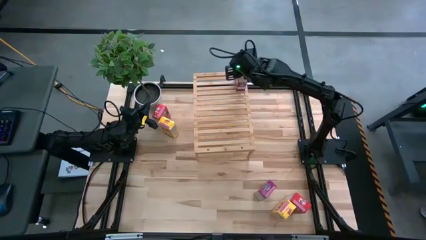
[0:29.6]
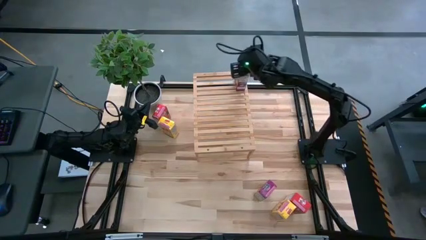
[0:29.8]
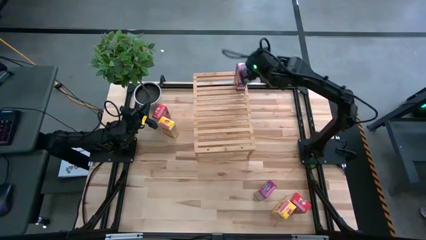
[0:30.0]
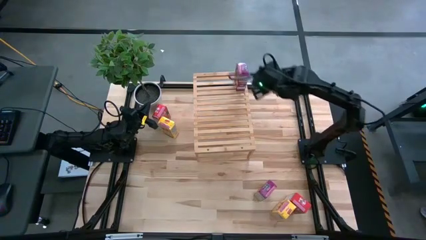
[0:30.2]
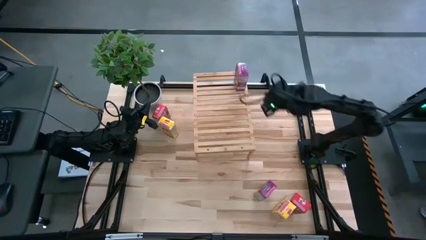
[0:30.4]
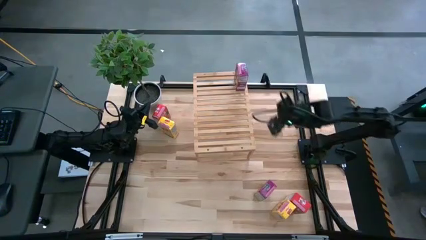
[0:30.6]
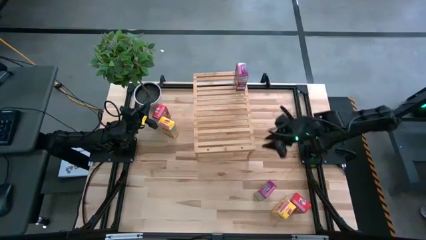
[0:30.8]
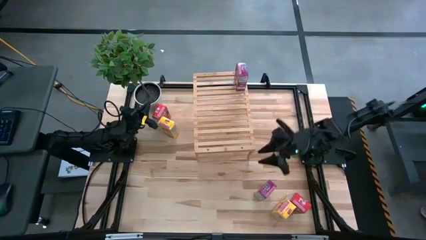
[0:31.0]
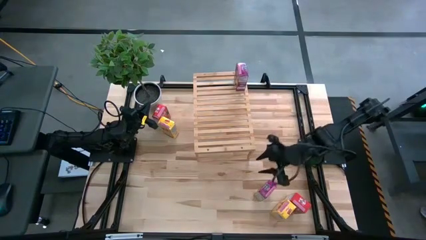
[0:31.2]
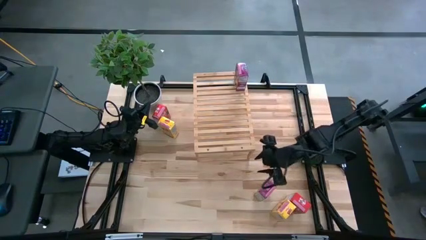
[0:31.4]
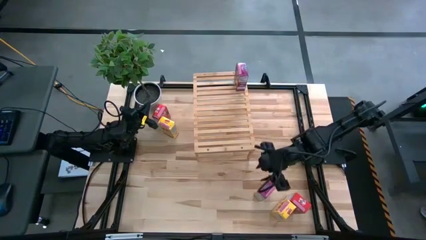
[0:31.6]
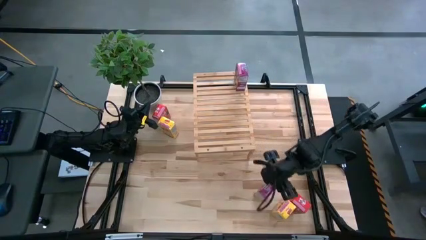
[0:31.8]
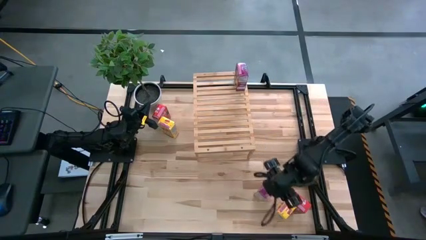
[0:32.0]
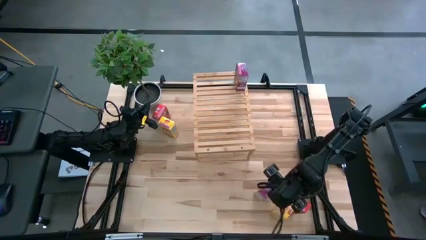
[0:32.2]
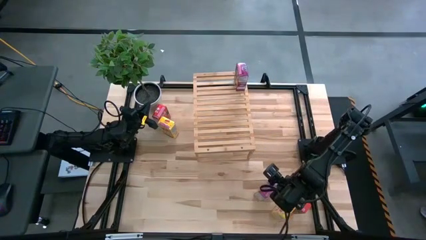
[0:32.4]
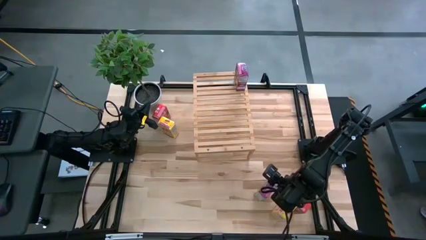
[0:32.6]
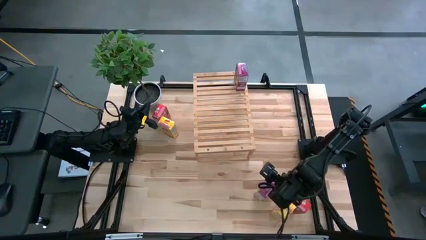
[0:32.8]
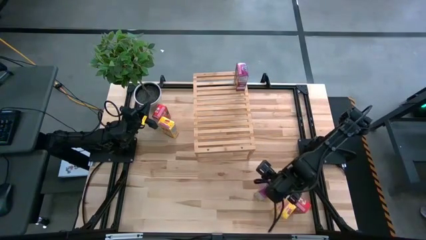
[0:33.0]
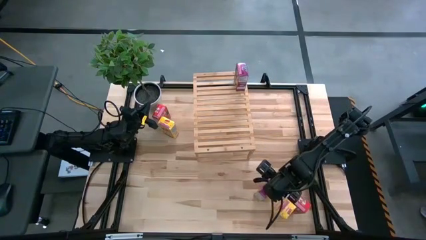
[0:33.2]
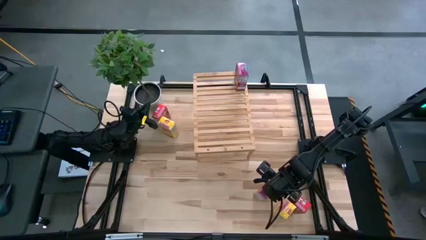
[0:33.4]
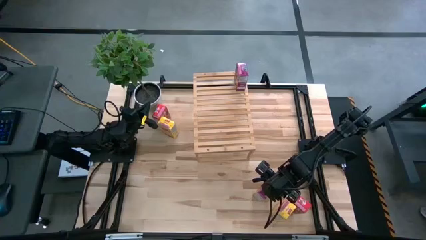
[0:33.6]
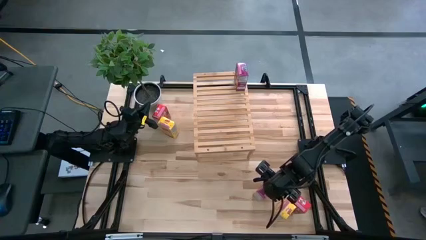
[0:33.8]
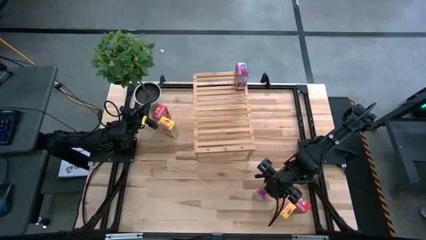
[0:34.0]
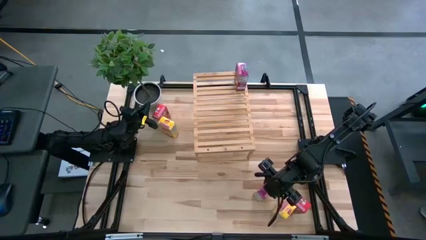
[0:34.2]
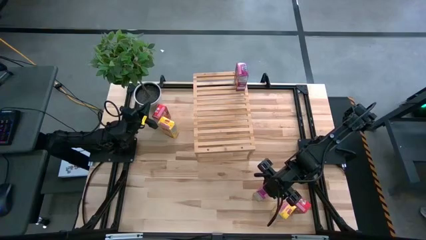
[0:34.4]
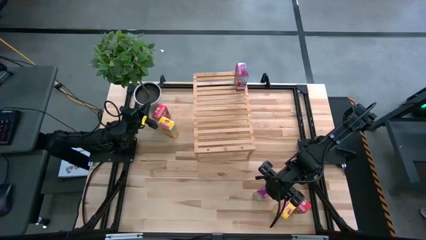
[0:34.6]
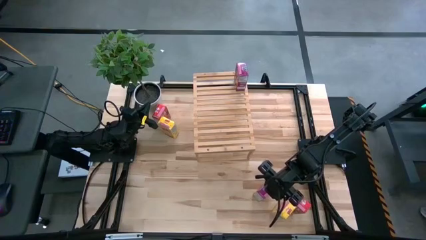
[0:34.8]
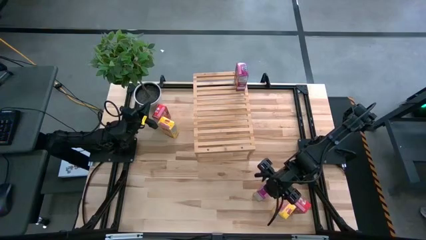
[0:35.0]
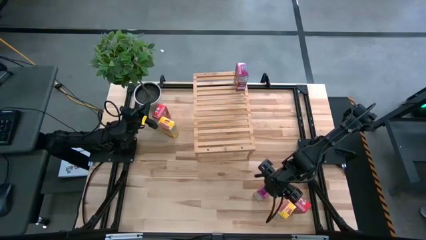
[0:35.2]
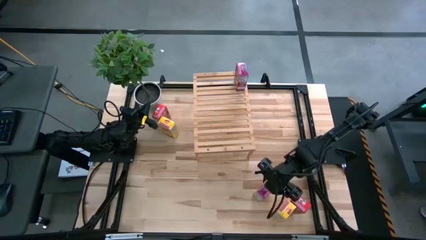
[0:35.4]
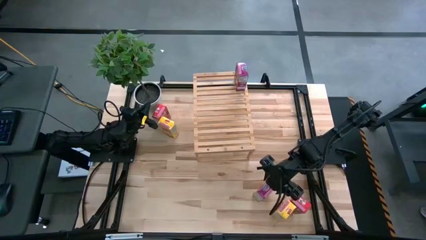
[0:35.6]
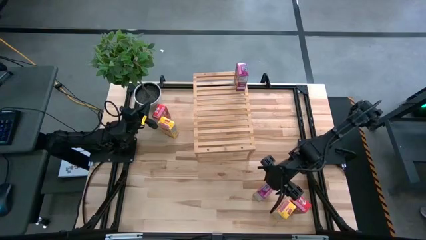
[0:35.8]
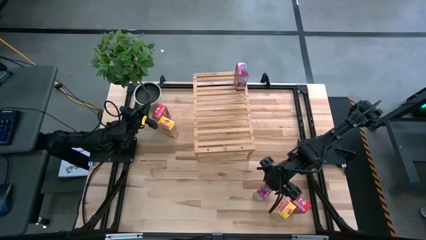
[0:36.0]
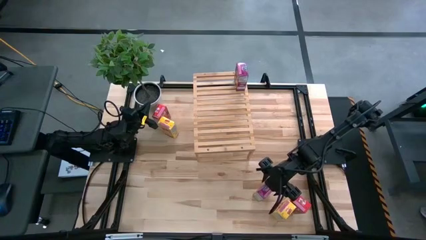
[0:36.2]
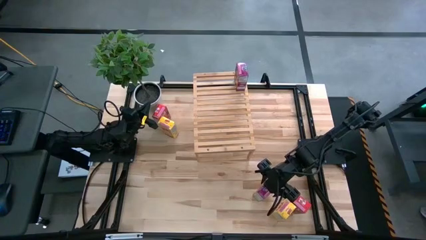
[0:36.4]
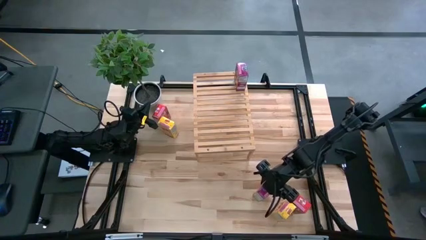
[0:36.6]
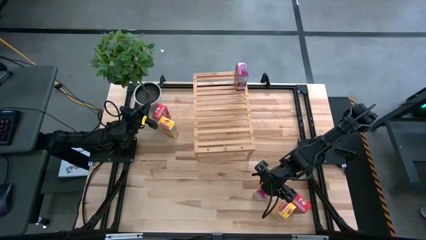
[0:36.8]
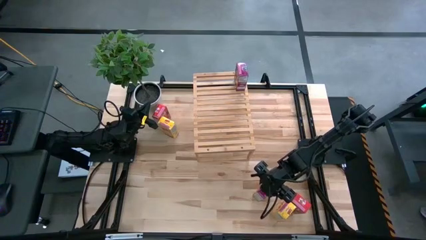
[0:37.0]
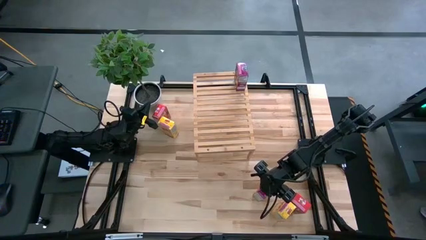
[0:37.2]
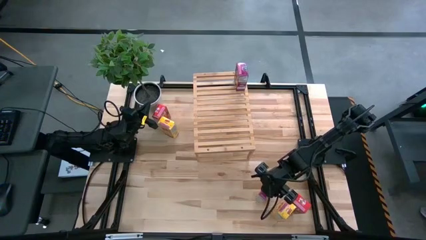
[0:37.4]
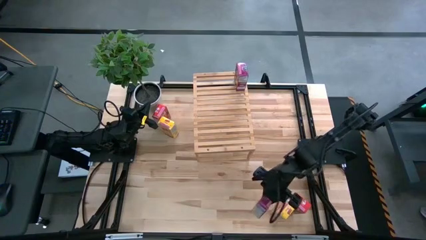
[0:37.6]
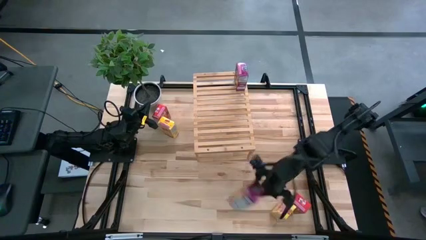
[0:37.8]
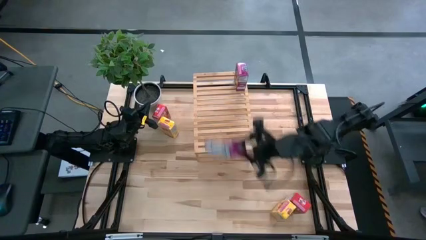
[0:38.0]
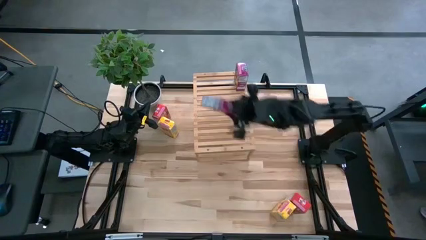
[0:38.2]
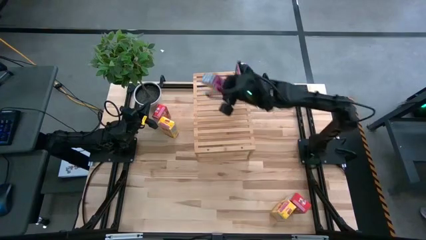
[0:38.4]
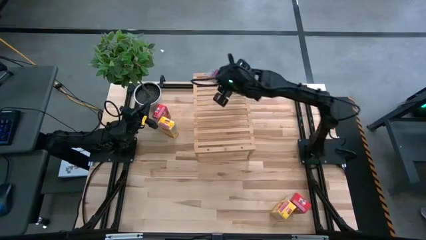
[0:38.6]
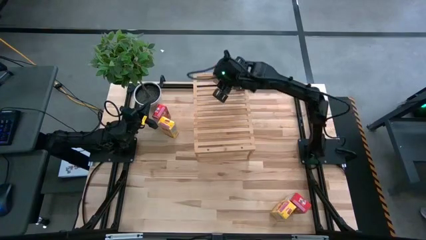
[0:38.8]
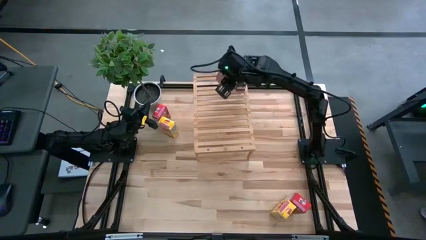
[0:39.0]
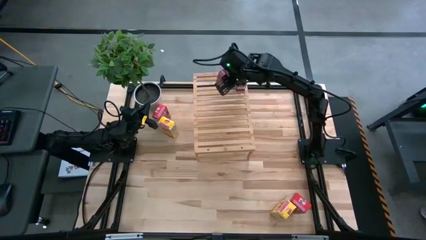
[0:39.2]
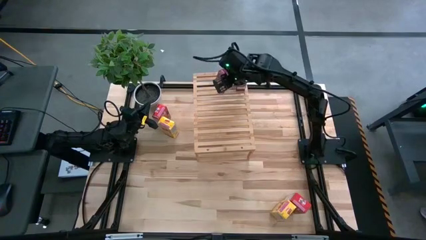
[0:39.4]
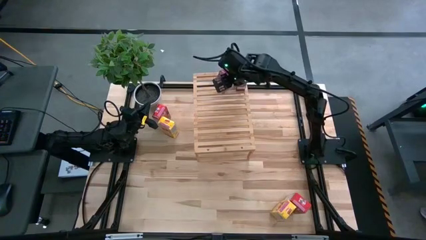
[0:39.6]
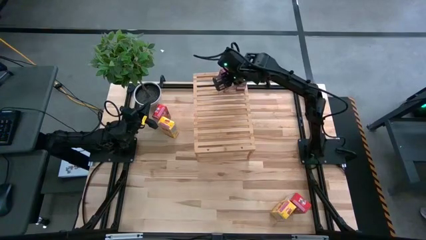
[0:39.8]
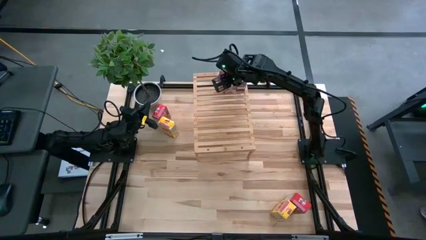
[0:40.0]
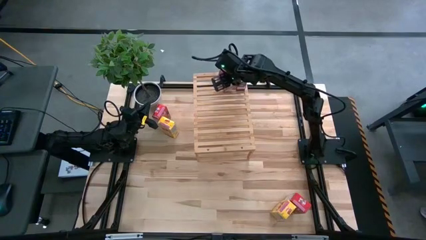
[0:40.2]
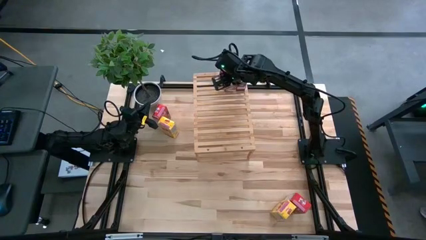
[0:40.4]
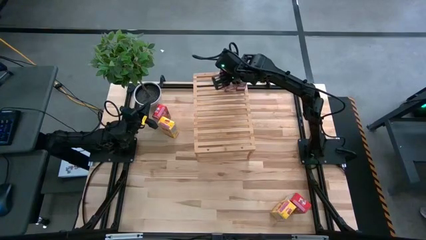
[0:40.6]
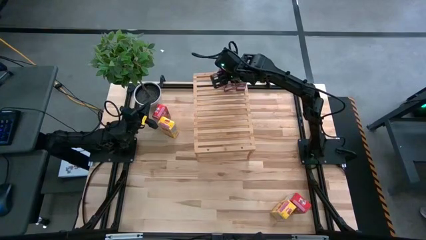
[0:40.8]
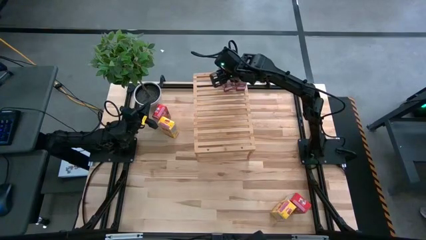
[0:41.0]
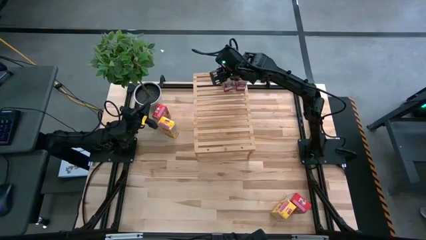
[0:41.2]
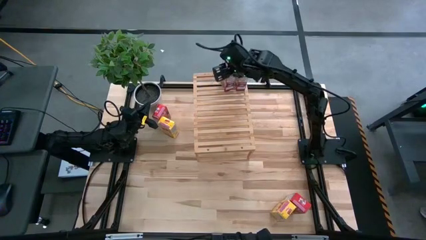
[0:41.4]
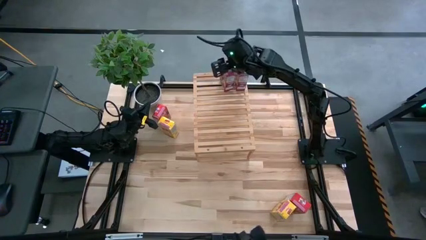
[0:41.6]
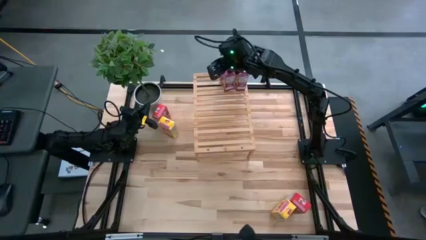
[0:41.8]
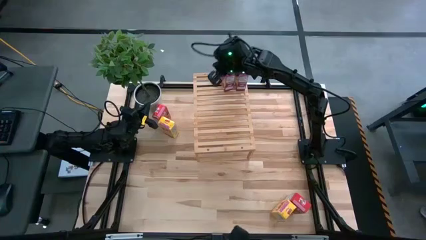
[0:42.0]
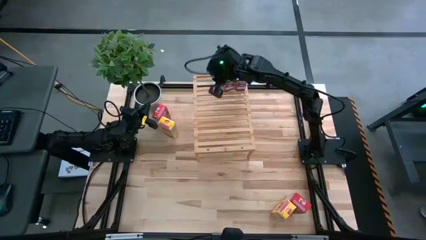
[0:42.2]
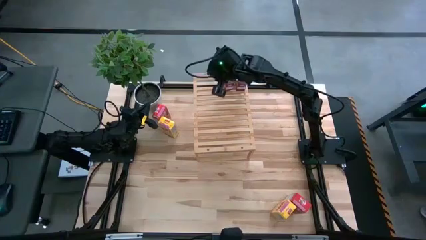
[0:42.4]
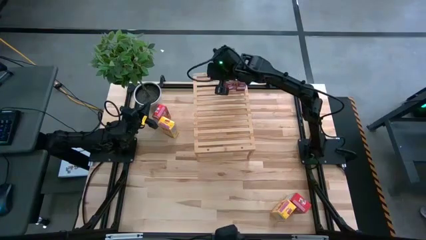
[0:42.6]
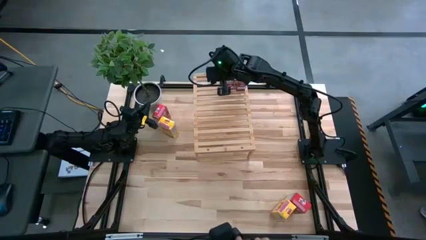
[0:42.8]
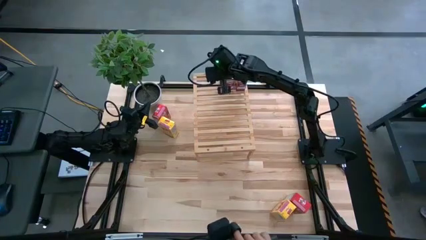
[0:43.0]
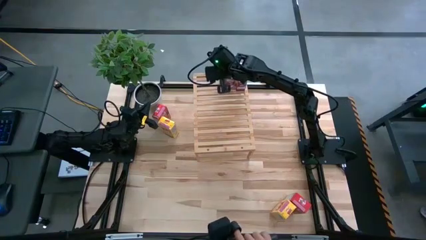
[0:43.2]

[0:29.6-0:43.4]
Task: Stack cereal on shelf
Put the violet cereal box on the shelf aligned with the other violet cereal box
